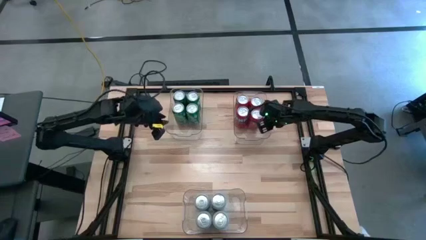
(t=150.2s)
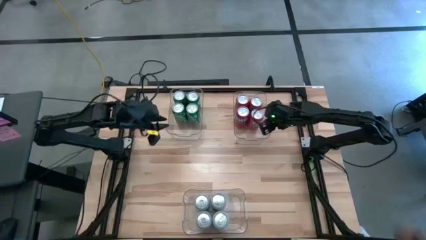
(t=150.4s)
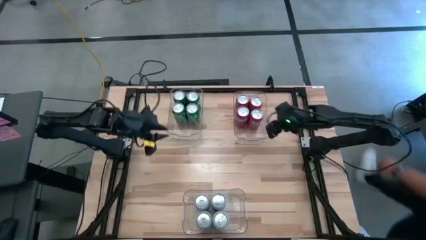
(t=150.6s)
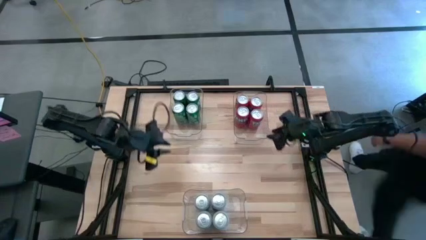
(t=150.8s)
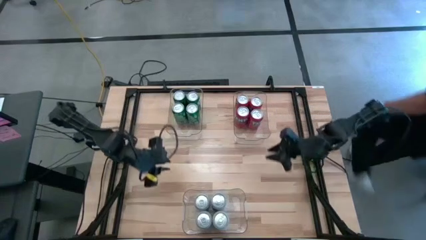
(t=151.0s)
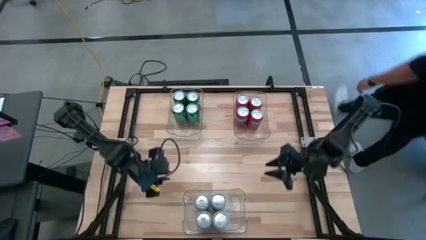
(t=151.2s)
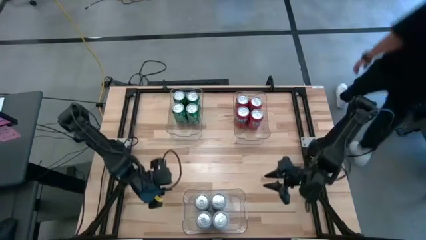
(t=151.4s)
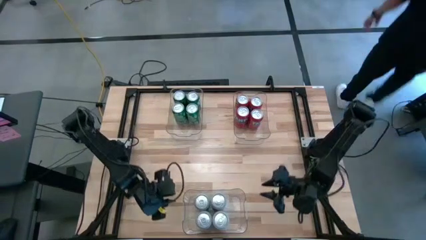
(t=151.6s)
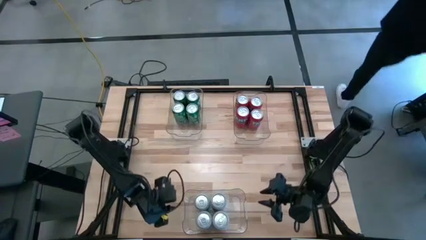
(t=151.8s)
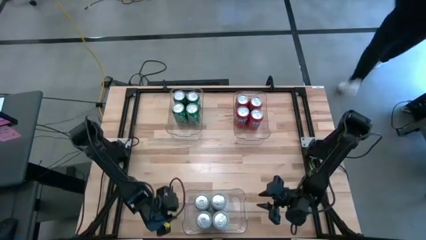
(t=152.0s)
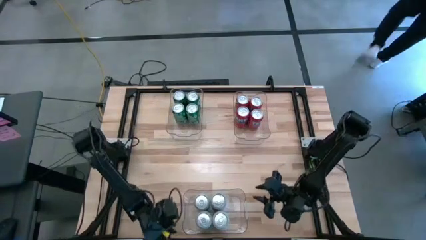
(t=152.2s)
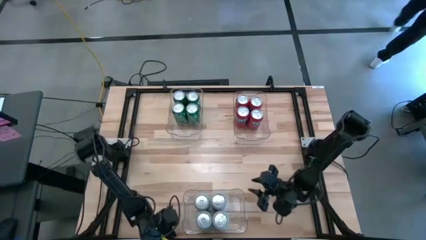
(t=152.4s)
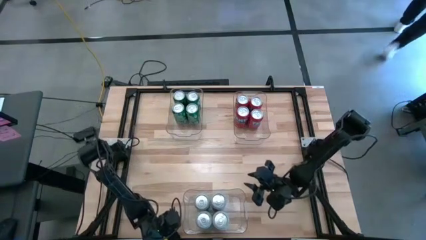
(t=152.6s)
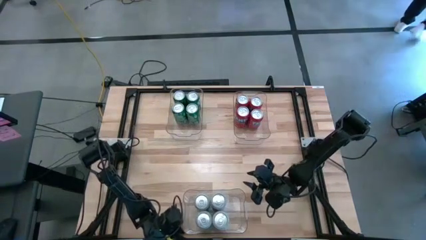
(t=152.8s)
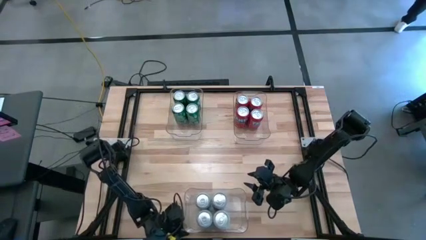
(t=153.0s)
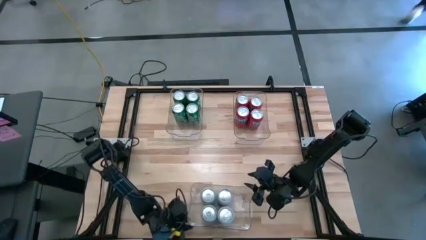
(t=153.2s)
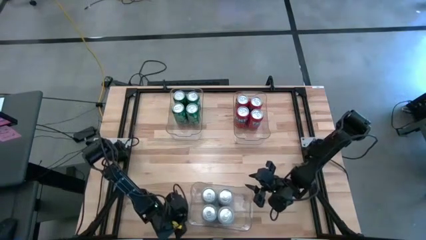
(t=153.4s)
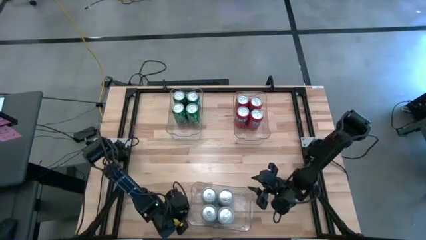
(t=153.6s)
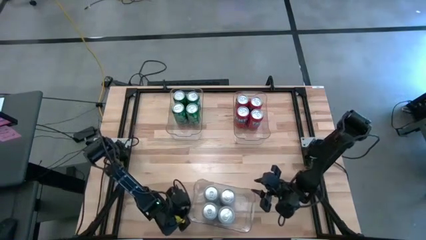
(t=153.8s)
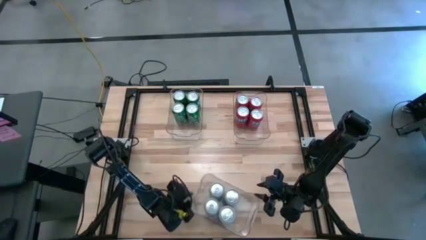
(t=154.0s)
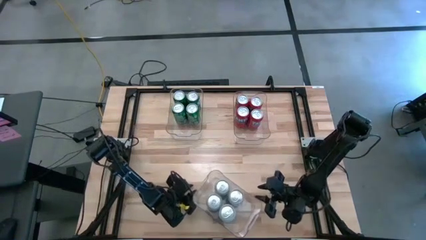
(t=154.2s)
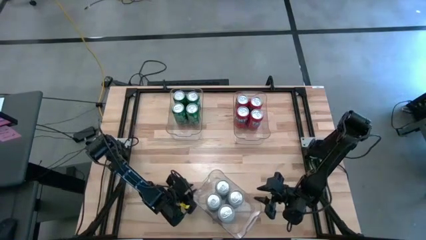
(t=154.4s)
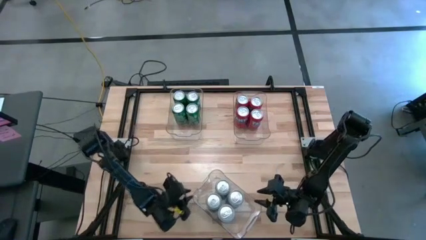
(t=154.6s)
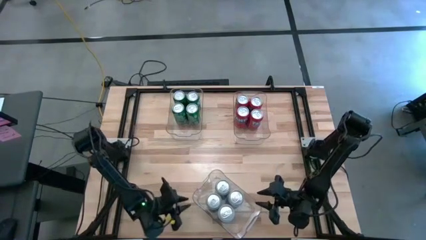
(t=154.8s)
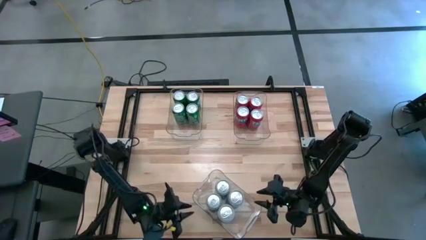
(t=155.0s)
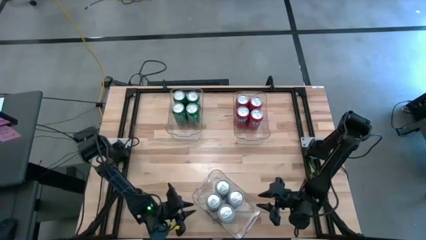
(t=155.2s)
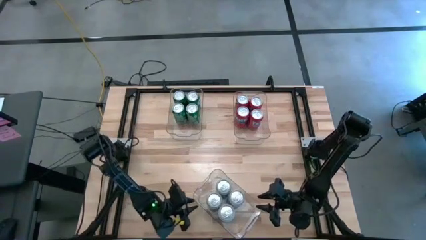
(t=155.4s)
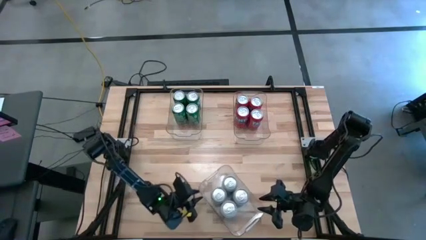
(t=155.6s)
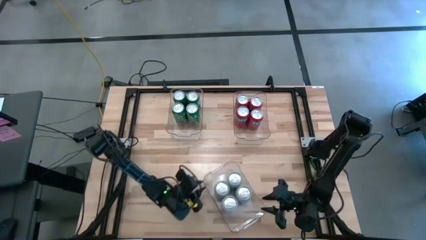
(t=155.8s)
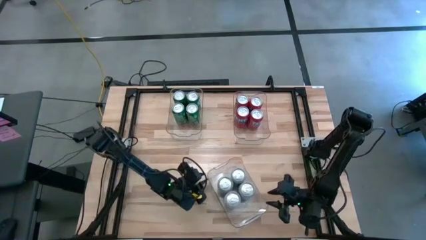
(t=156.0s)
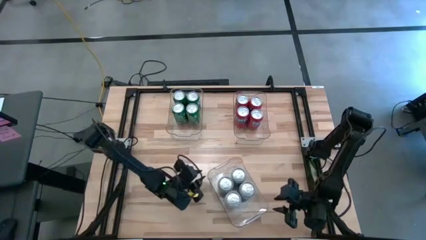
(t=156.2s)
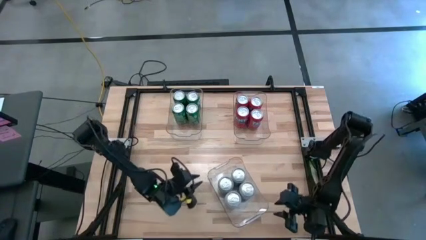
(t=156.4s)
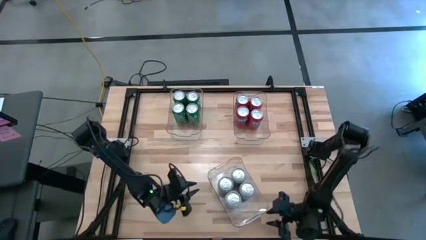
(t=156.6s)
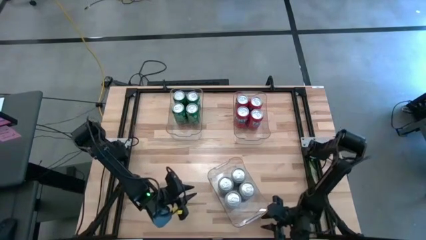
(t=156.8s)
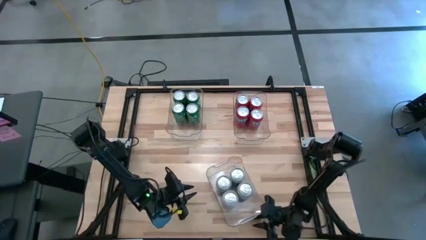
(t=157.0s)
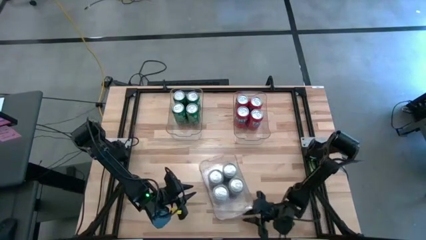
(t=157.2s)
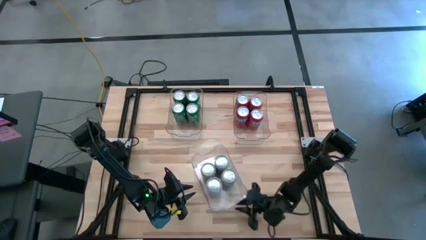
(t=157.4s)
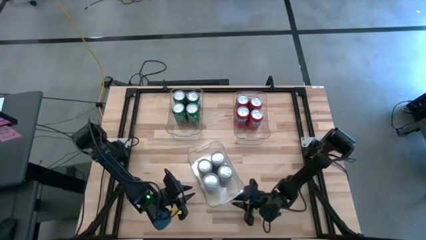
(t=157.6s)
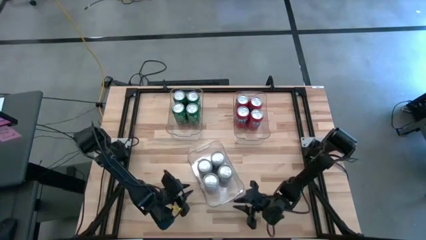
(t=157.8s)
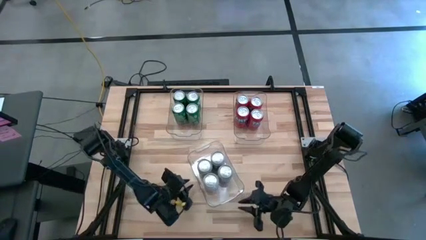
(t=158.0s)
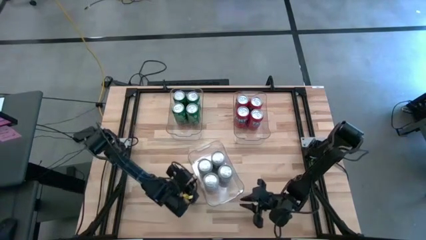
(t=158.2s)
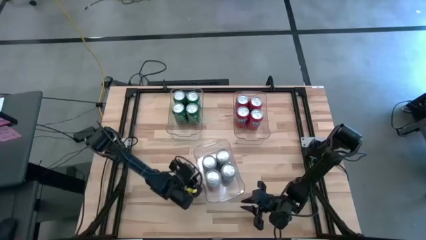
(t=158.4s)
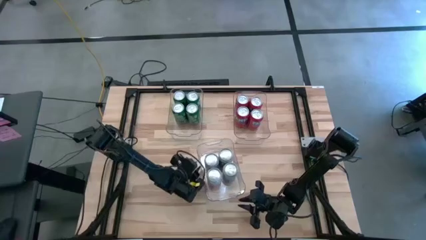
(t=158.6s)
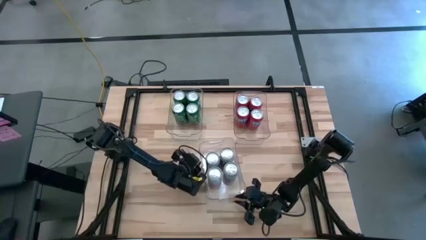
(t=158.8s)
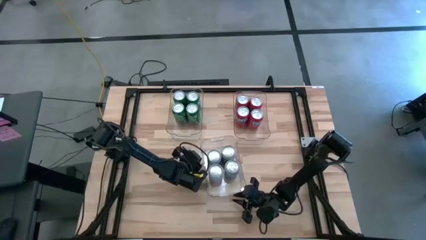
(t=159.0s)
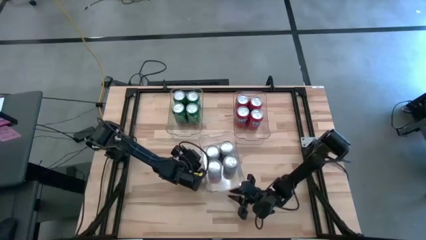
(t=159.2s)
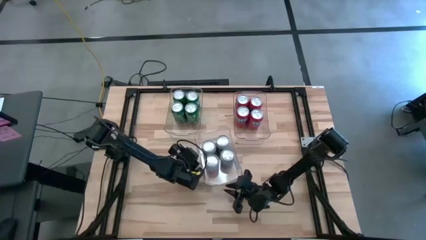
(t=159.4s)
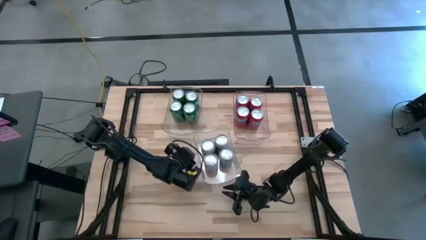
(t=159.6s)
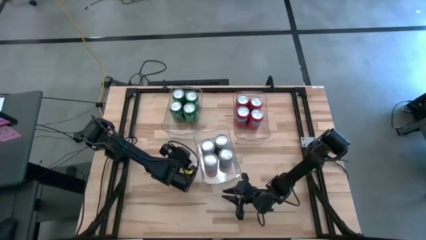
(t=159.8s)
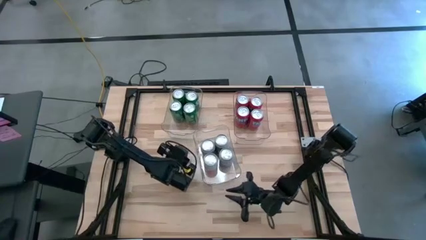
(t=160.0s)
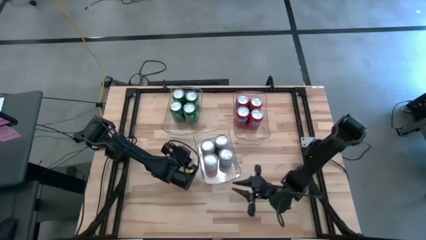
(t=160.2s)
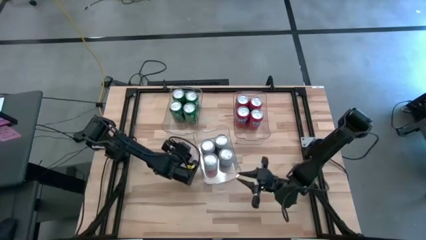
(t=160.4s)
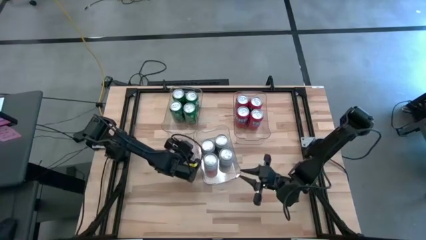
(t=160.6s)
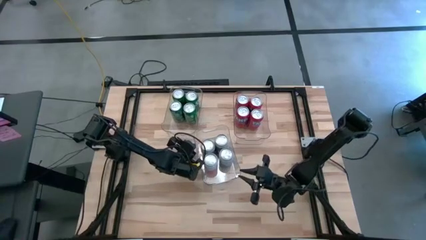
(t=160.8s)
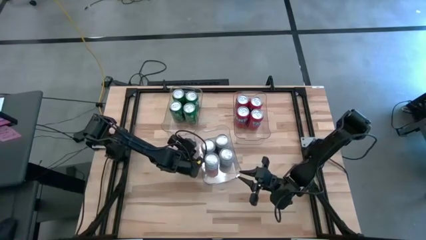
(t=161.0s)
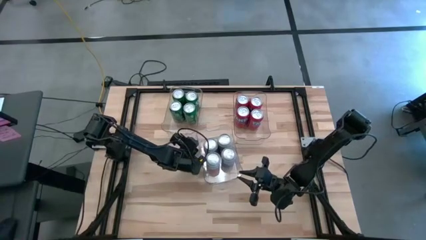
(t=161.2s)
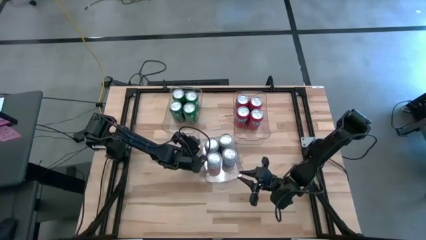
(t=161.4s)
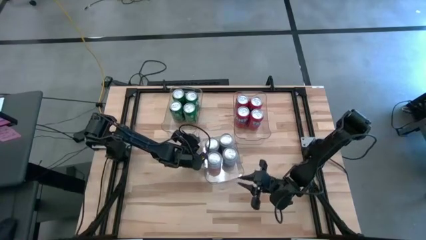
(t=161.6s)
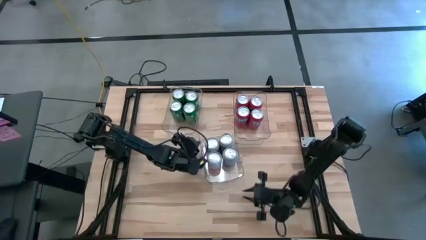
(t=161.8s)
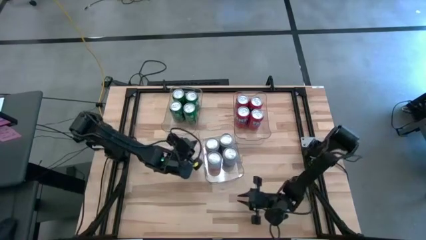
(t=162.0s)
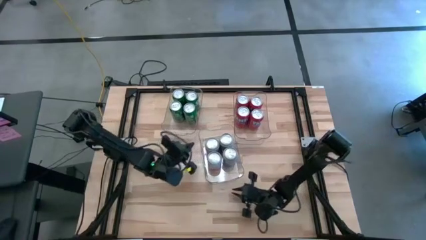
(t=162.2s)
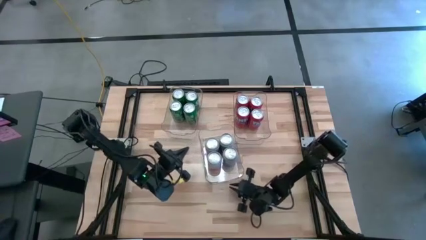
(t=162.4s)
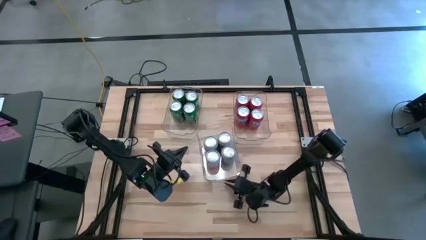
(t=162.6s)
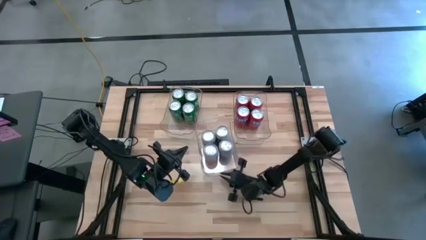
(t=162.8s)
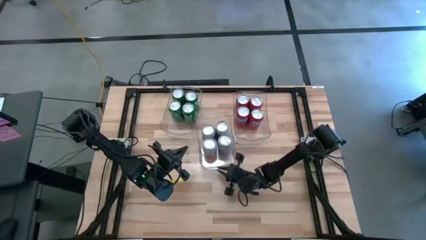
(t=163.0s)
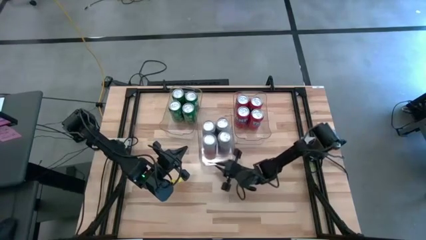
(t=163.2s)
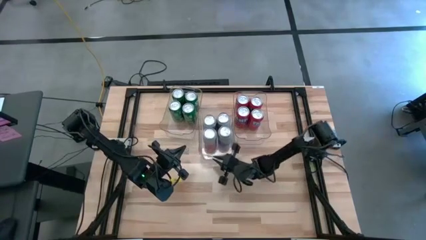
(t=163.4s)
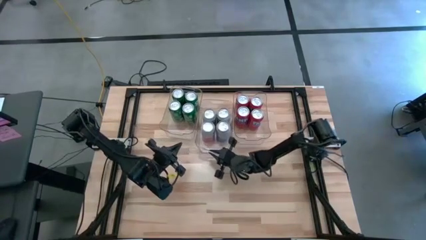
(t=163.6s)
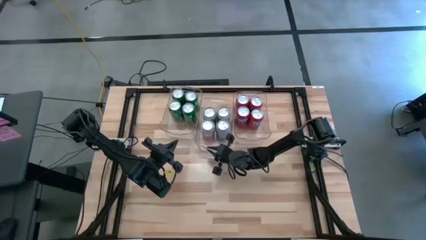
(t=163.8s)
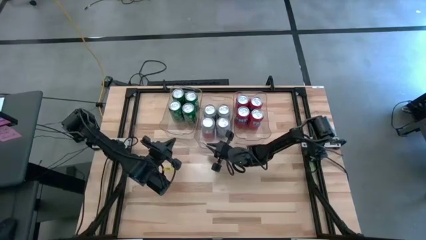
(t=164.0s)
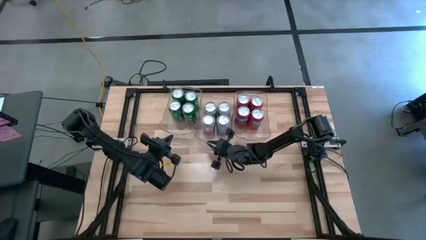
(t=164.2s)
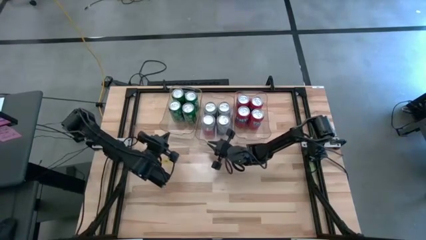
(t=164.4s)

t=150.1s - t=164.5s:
Task: Sort soda cans
Move the bottom transparent bin between the top left and top right transparent bins
